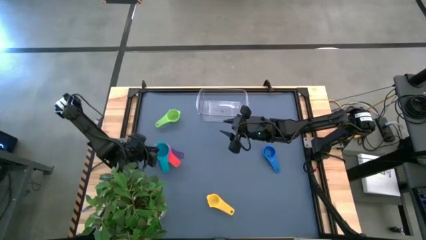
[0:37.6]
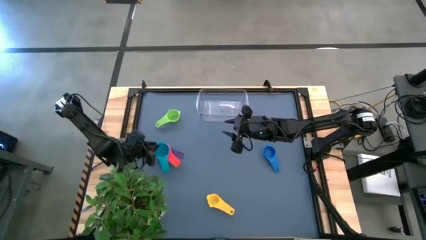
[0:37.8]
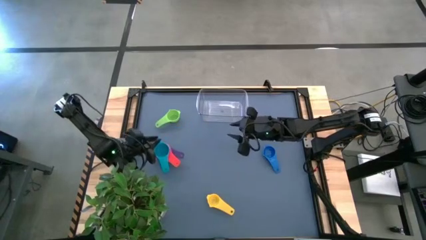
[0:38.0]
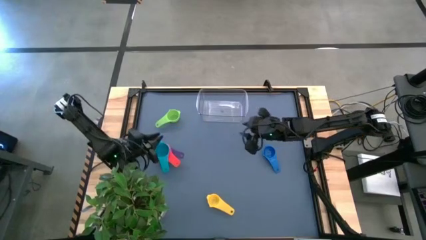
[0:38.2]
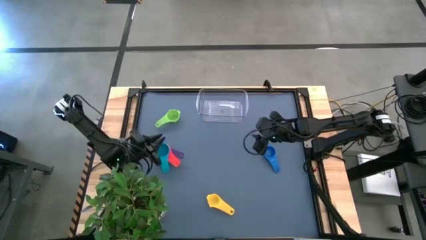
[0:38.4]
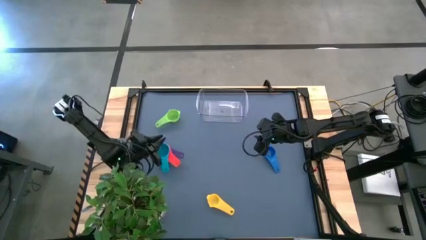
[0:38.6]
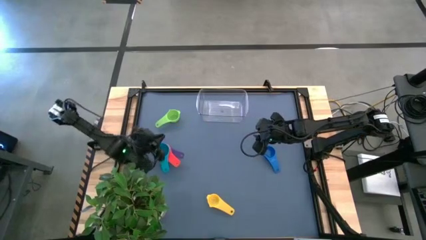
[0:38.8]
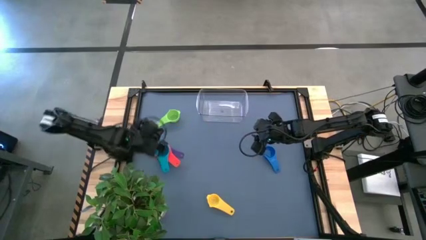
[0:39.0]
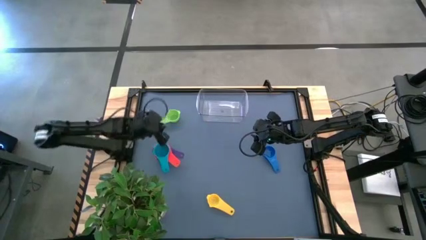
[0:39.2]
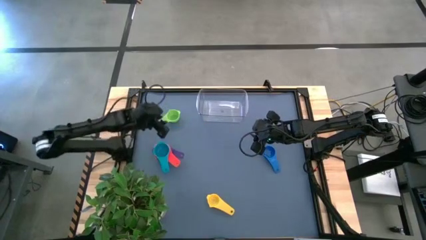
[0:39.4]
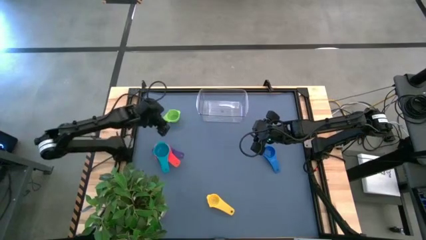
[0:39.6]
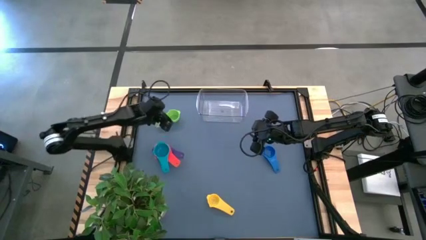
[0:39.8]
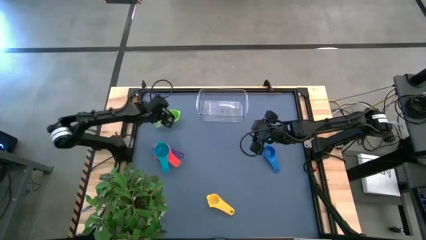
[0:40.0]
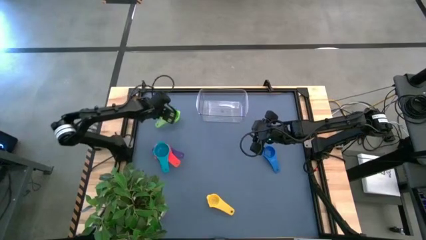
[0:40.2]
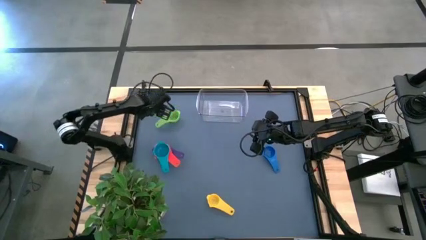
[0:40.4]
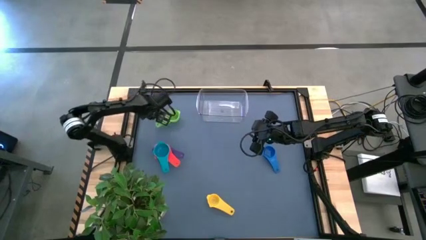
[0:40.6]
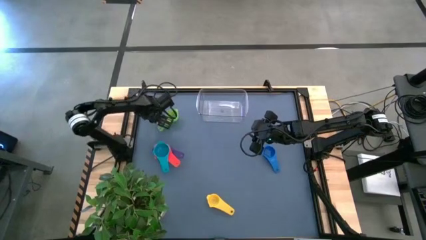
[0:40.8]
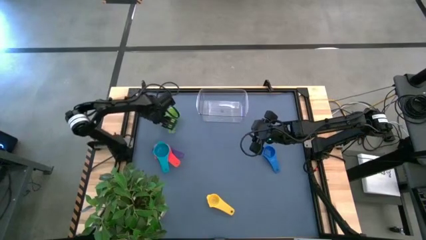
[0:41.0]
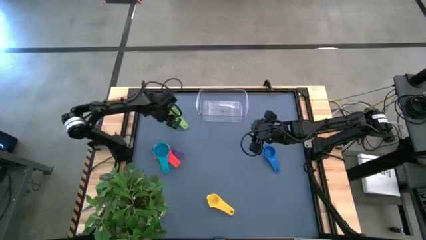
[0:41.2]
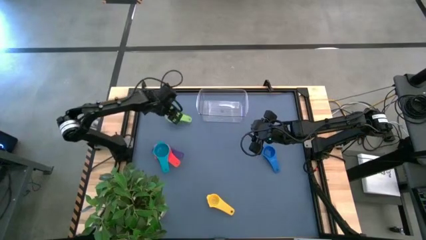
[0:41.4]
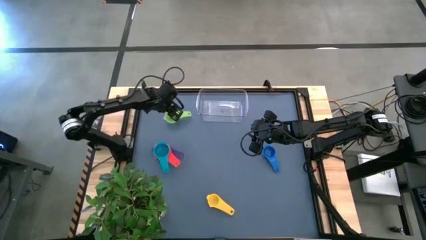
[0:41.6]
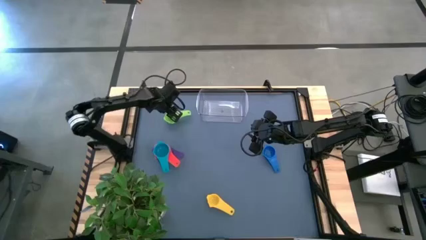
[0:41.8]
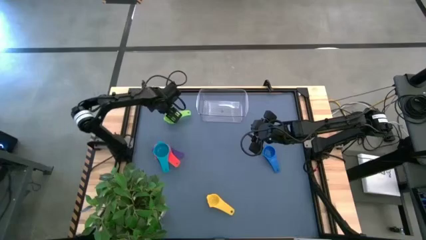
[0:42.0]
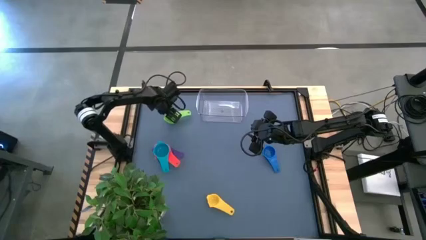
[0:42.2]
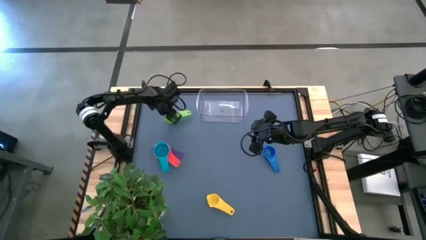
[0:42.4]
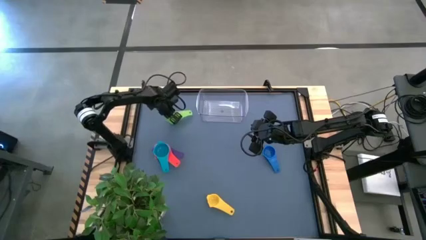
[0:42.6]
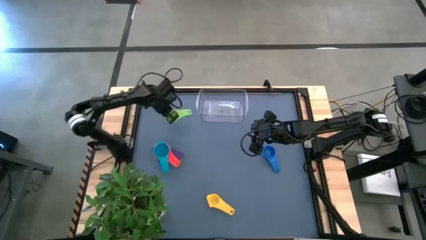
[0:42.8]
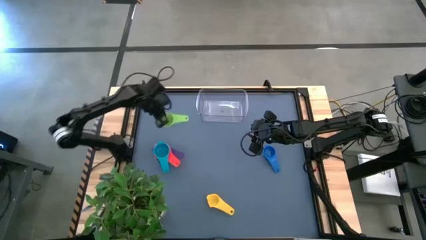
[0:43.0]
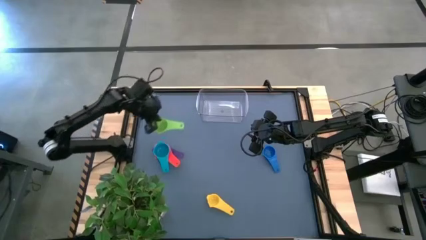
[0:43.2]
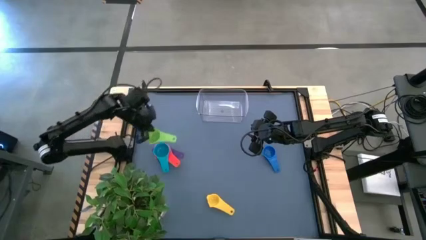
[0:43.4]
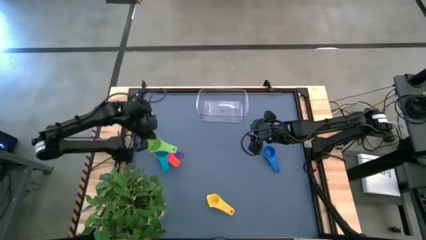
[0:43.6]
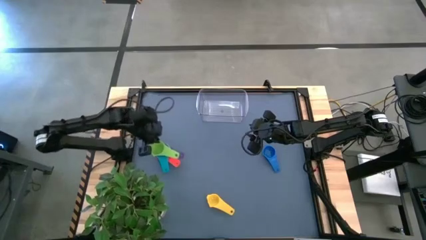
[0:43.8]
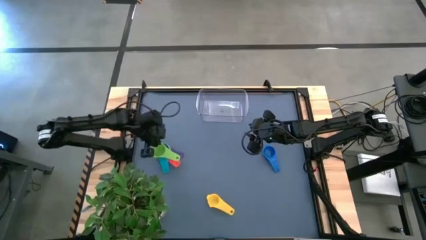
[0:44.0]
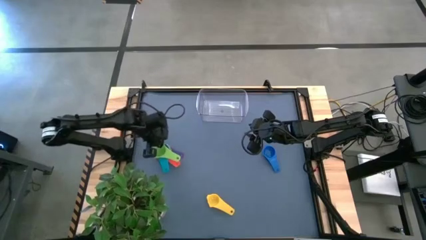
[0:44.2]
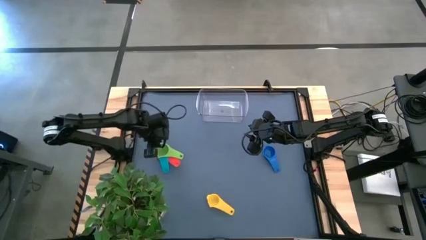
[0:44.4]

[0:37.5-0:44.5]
Task: Nest measuring cups in basket
Stack the green measuring cup on top of the light blue measuring cup

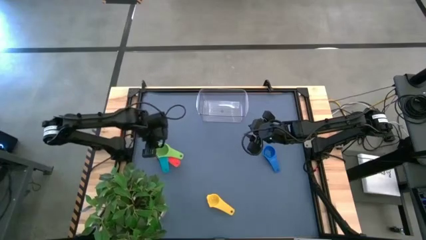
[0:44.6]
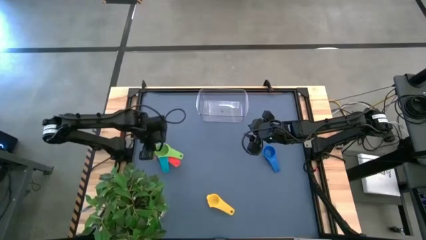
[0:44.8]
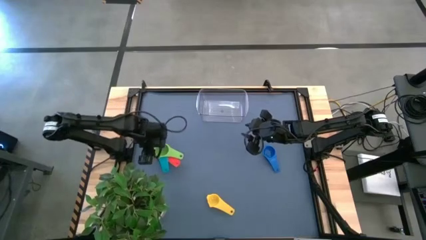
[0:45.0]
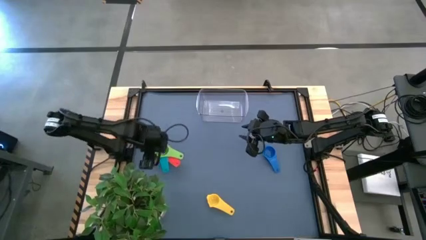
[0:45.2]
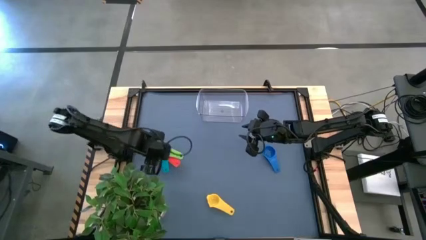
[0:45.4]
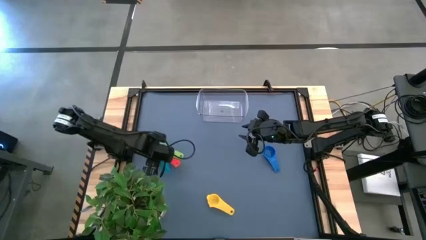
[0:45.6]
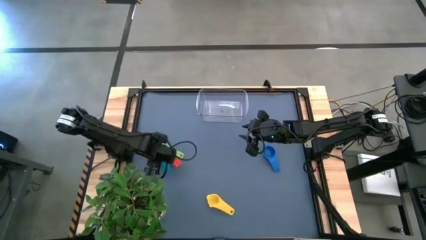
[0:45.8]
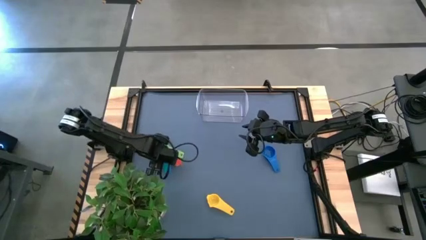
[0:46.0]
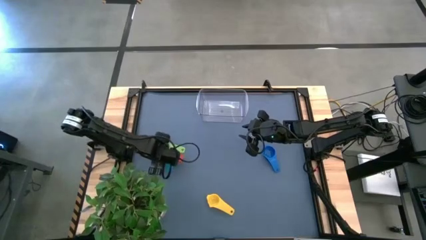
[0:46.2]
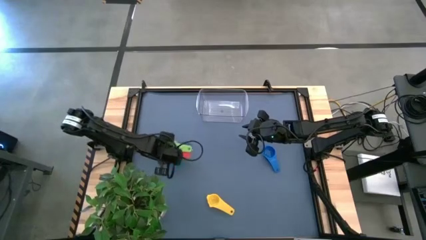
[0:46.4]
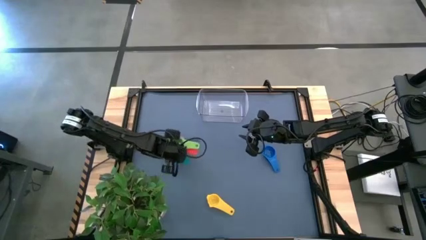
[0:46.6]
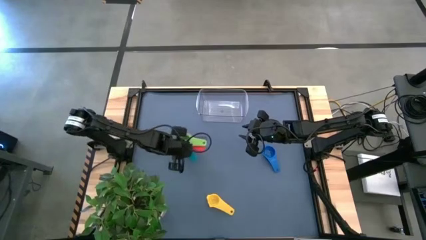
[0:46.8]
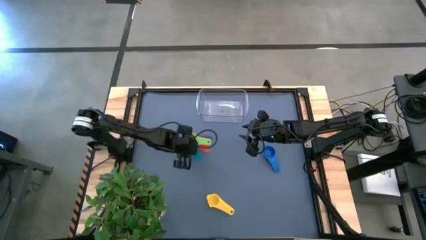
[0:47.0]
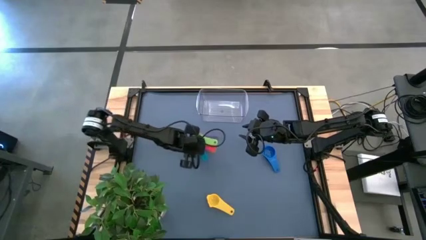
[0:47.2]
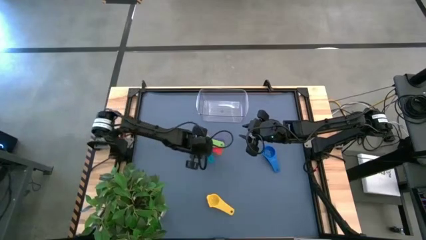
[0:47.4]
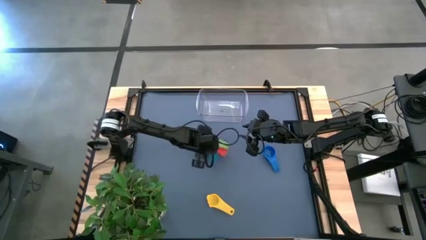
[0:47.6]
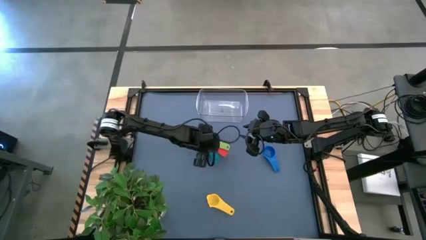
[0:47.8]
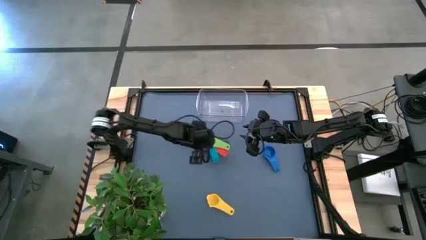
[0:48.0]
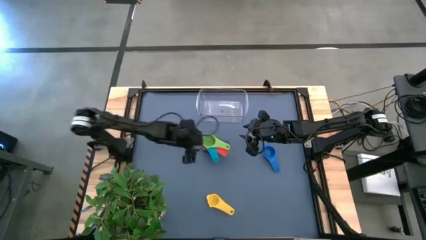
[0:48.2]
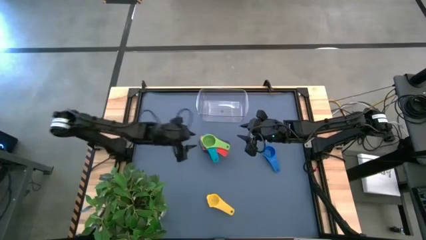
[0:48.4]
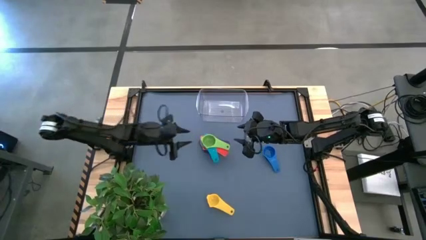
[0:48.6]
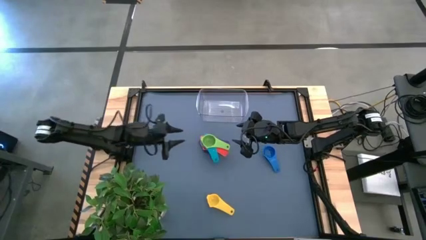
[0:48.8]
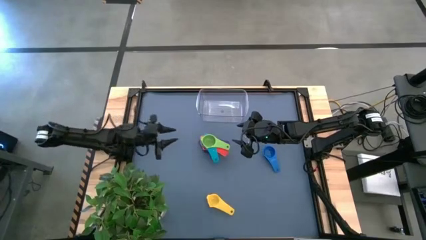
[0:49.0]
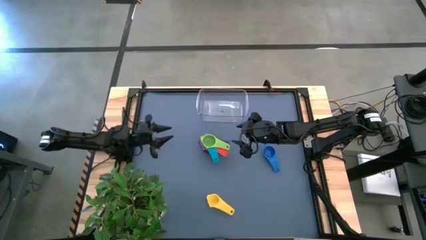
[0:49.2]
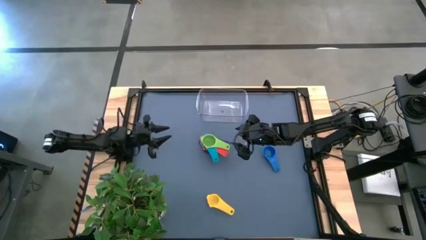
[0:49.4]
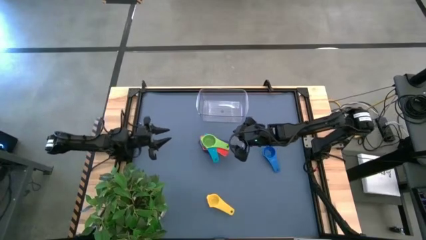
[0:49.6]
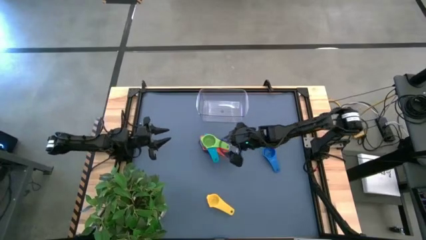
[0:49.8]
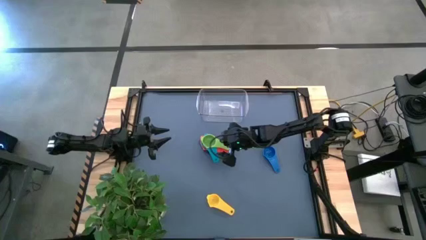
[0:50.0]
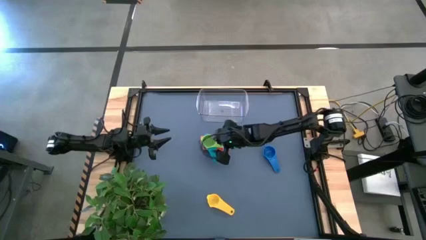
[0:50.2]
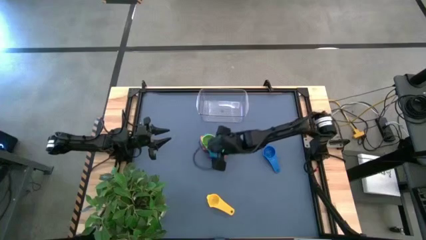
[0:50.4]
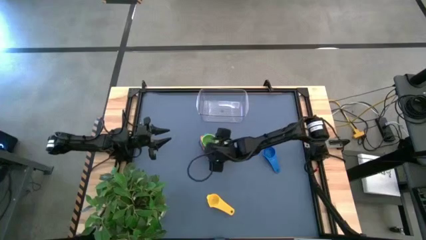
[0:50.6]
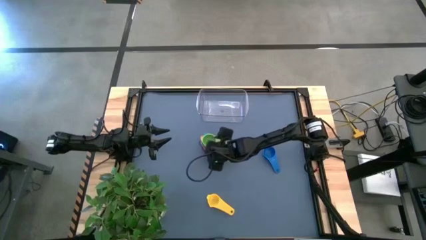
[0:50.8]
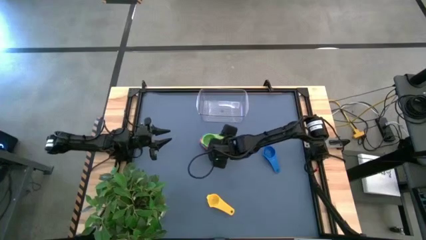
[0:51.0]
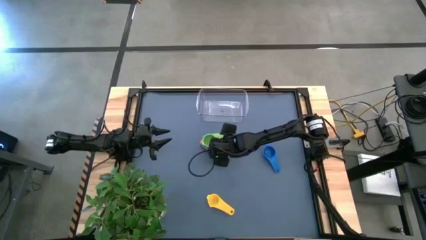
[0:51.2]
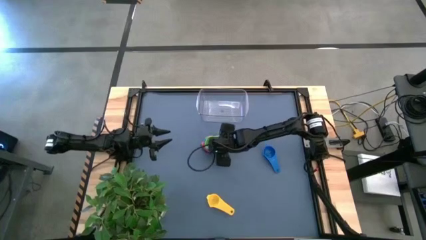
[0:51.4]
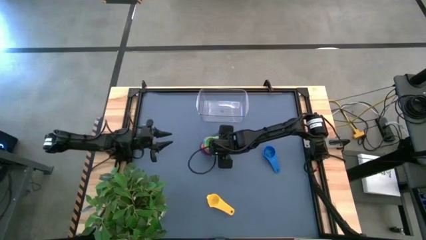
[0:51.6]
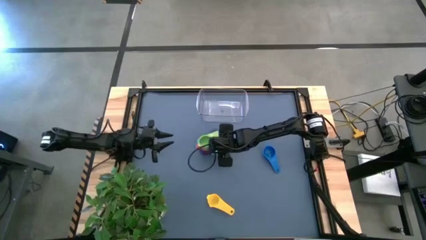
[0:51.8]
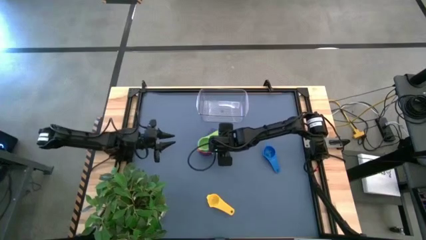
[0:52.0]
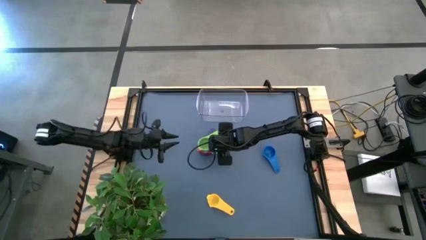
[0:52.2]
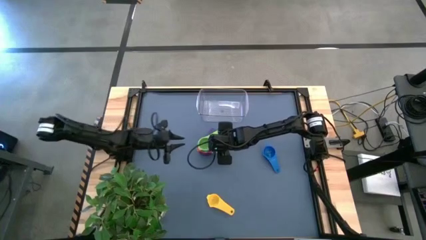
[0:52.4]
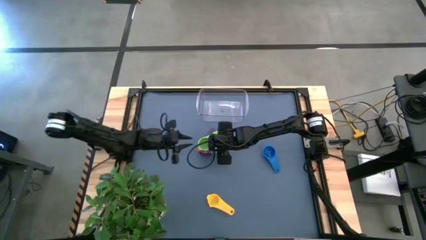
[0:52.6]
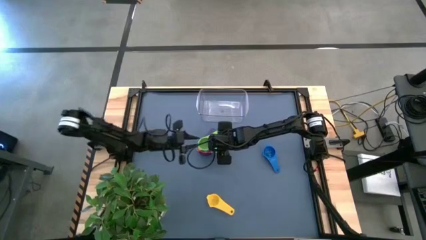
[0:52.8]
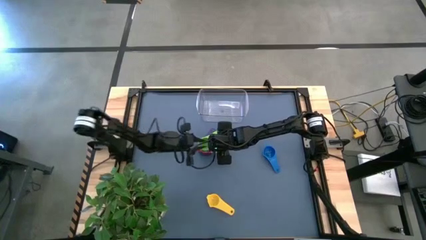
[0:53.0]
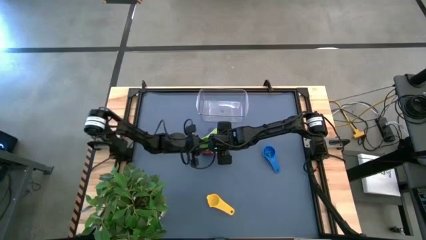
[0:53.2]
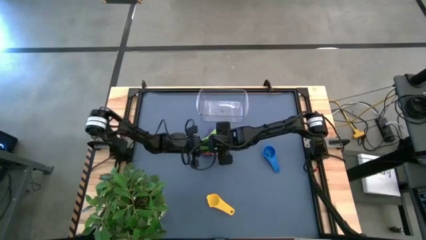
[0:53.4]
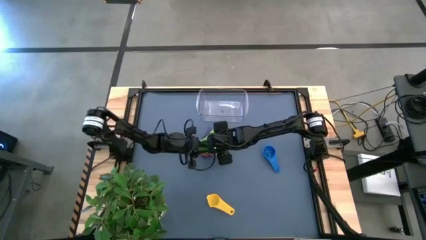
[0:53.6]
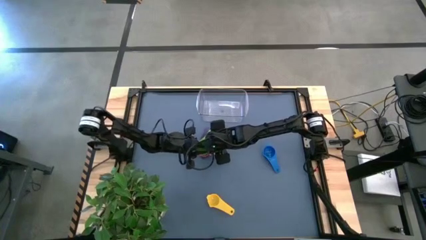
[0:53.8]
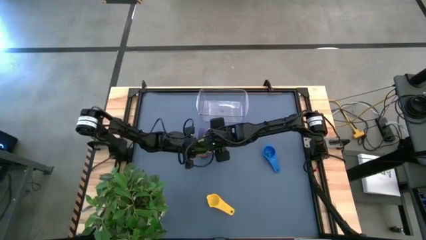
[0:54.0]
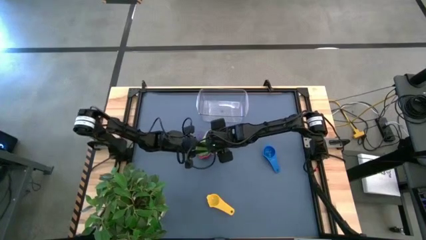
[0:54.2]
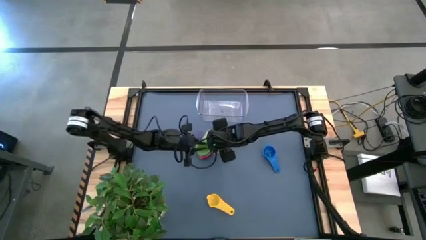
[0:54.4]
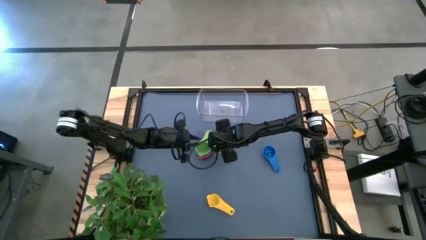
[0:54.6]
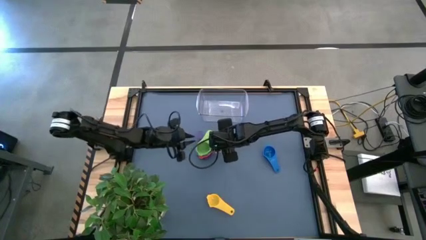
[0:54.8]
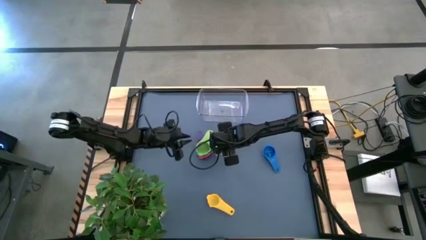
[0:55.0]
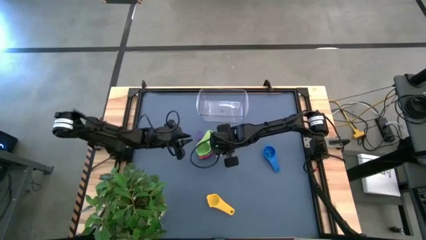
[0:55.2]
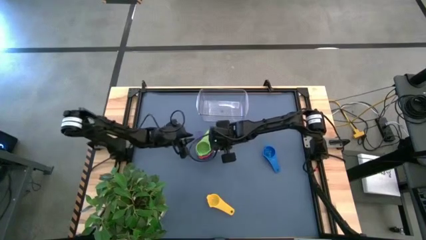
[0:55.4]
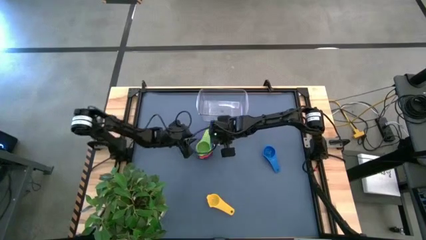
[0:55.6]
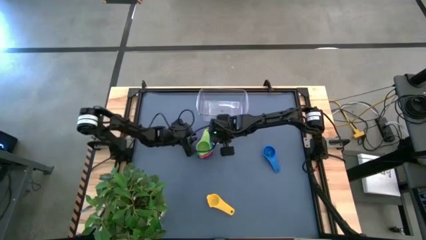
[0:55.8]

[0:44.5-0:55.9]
Move the nested measuring cups to the center of the table
